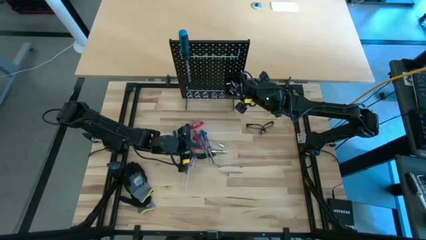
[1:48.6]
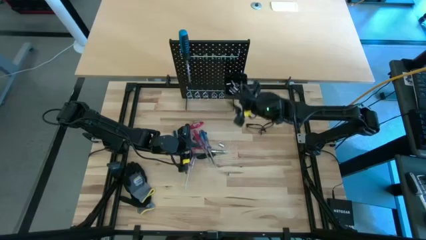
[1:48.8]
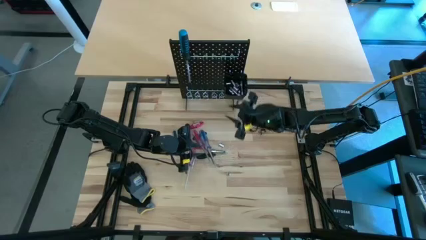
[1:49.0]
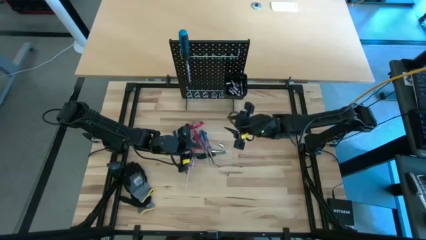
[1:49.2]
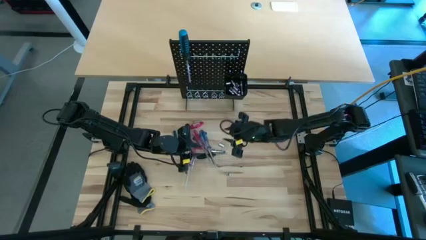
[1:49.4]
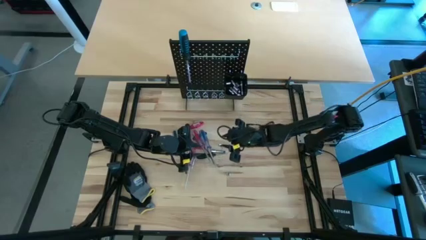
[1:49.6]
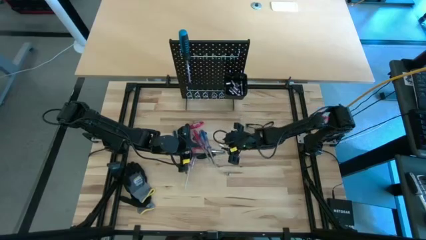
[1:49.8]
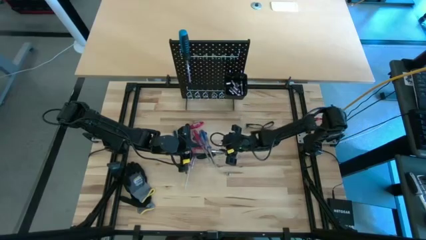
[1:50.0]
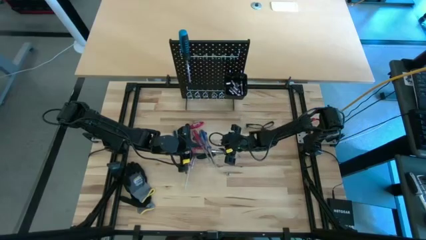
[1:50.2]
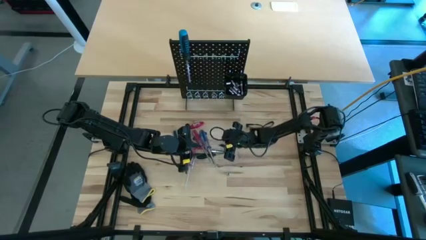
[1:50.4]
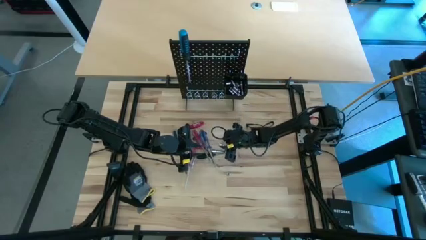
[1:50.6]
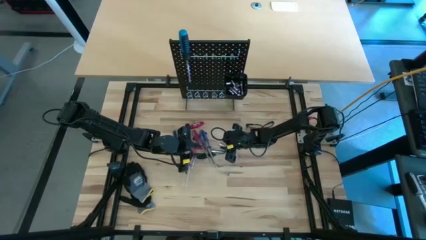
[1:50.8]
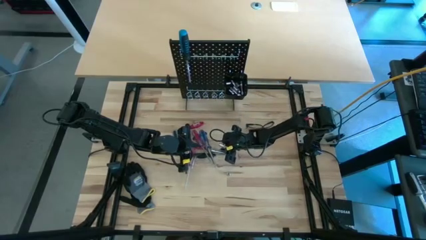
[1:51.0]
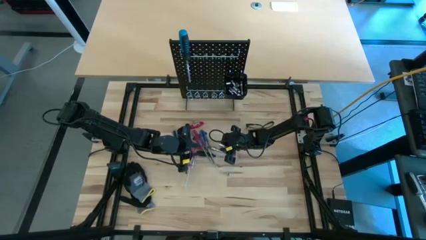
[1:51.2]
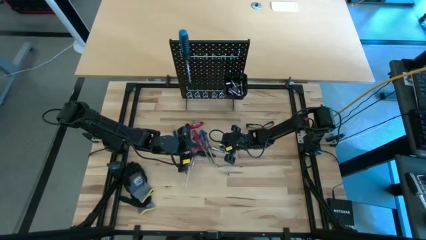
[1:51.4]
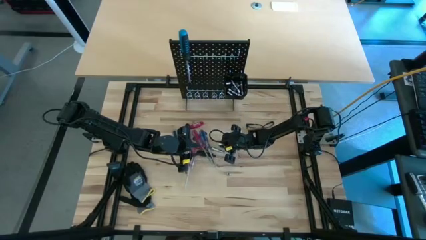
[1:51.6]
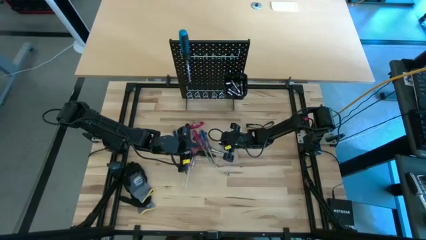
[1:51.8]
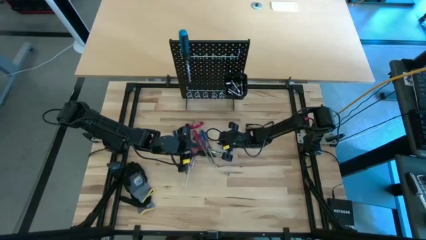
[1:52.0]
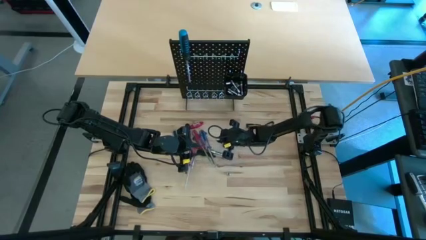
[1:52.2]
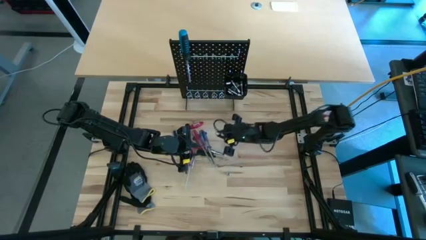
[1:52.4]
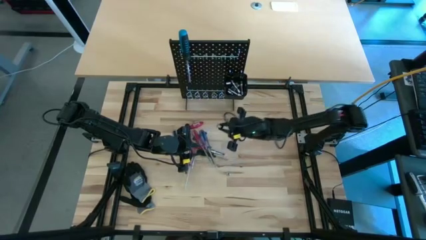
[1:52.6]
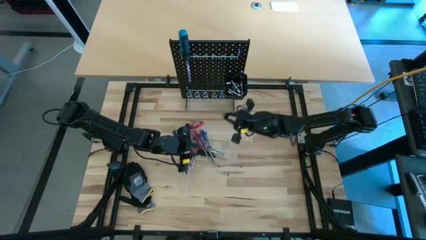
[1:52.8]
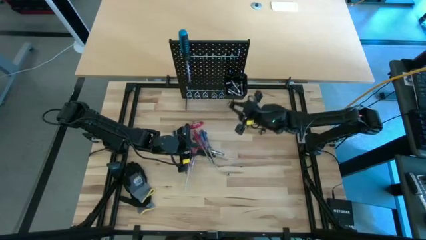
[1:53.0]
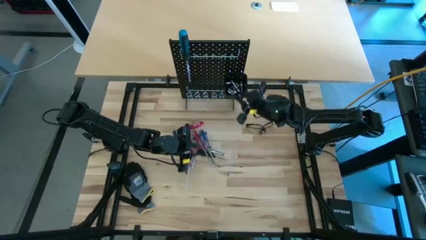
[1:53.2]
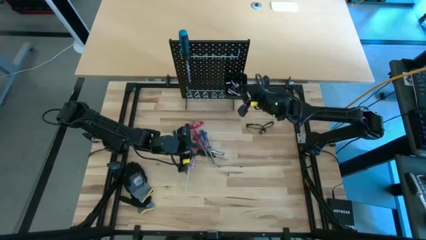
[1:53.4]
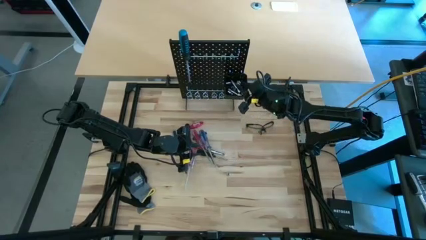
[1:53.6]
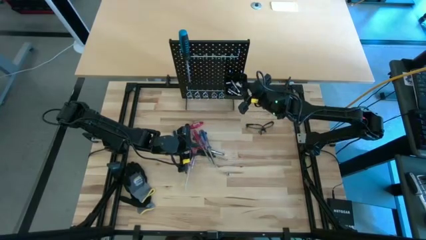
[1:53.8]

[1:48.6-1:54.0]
Task: Hang tools onto peg board
Put the silver socket into the black bin on the peg board

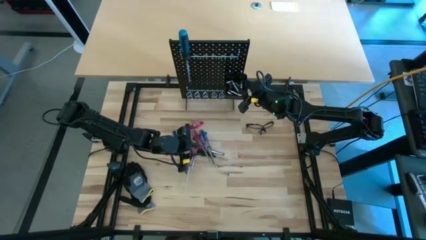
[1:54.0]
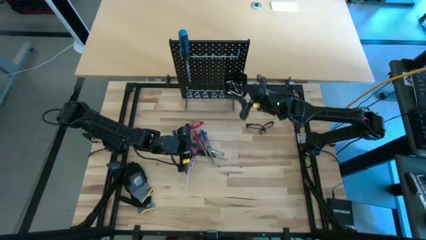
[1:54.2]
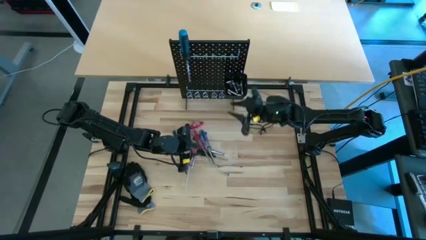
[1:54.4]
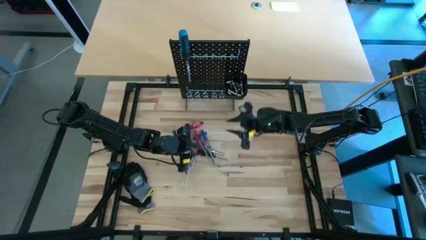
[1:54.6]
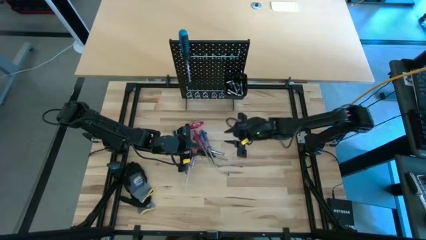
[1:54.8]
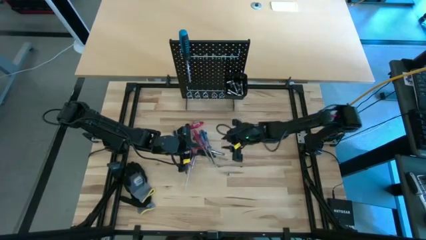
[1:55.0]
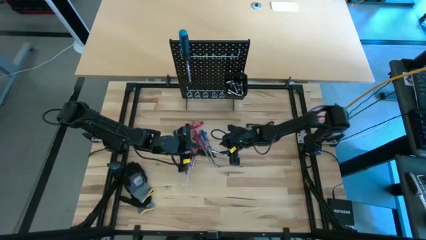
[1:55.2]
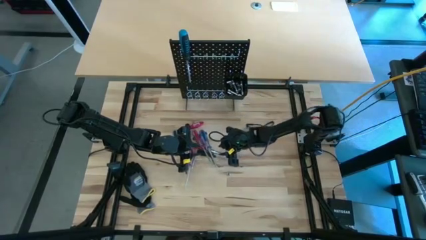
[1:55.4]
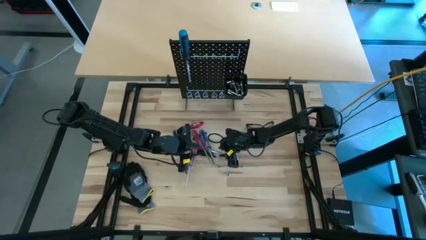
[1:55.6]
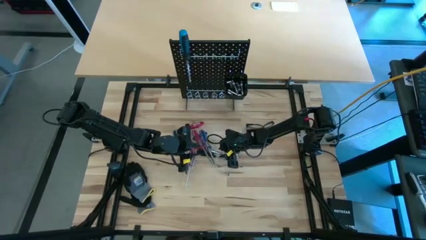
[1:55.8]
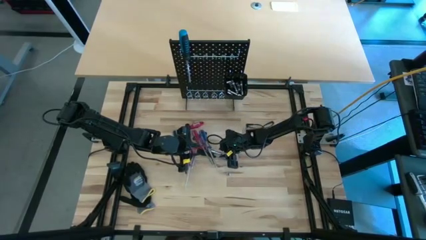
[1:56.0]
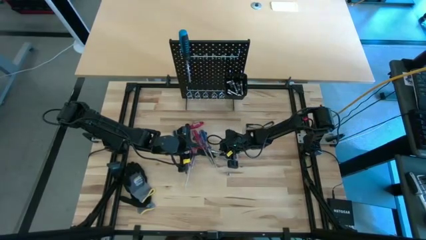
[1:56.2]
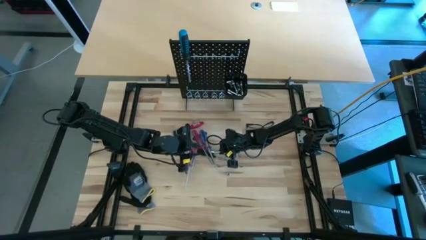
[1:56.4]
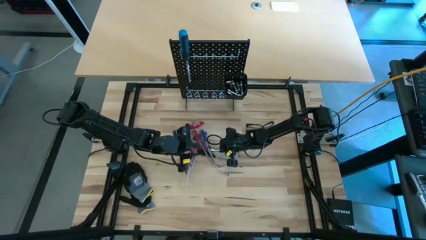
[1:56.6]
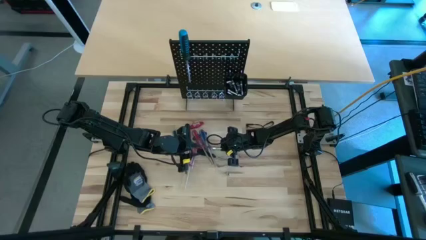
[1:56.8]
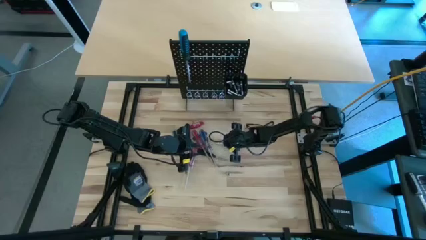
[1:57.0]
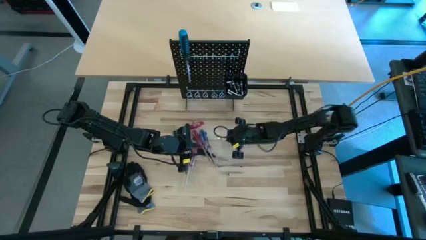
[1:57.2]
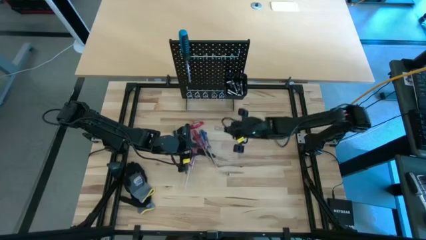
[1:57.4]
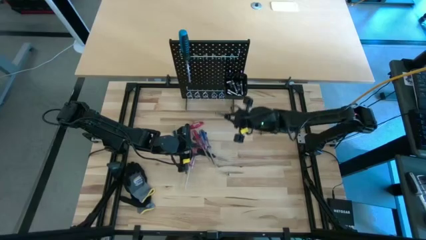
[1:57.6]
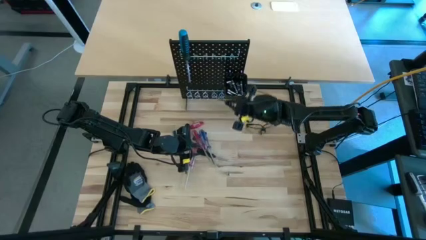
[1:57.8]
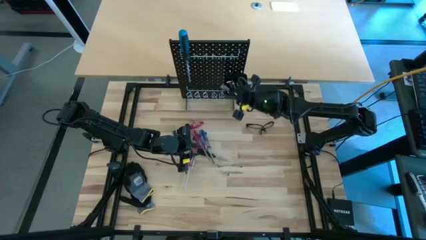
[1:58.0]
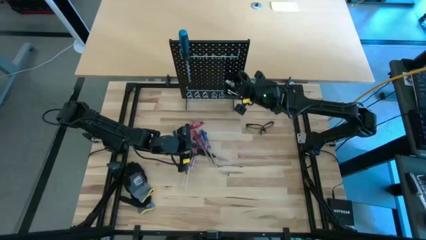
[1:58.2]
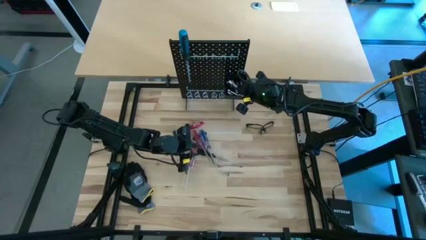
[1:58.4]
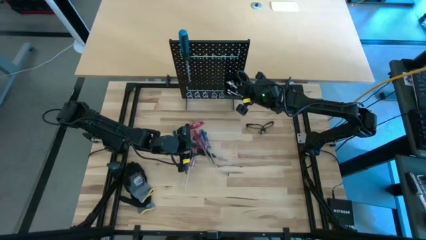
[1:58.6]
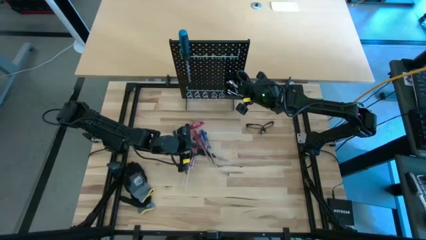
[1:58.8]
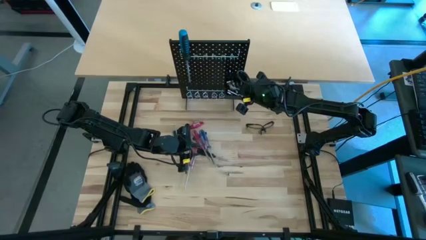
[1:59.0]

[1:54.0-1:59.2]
Put the silver extension bar into the black bin on the peg board

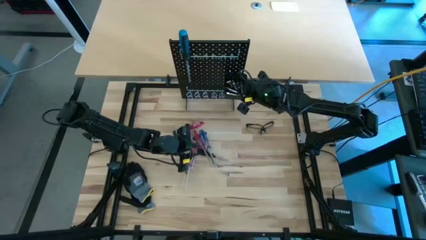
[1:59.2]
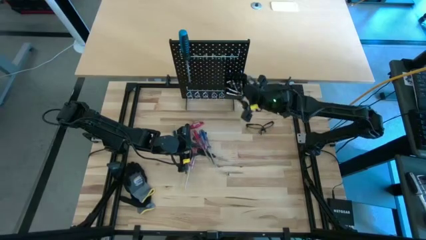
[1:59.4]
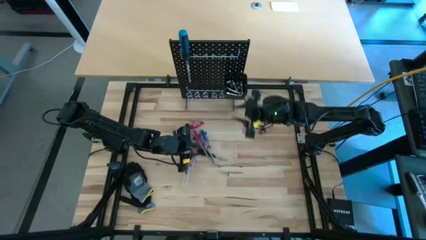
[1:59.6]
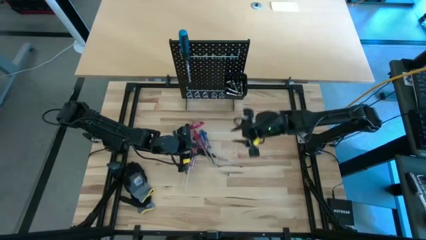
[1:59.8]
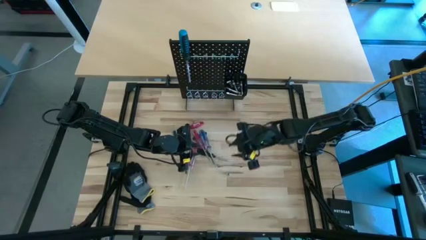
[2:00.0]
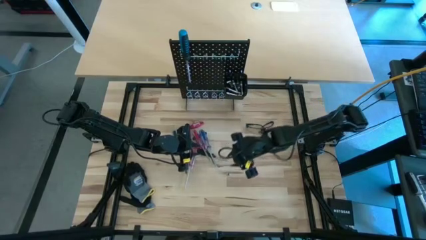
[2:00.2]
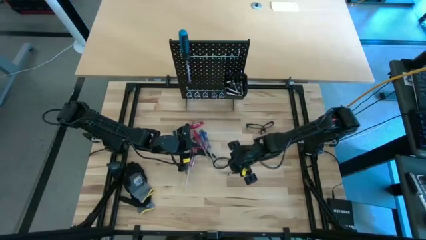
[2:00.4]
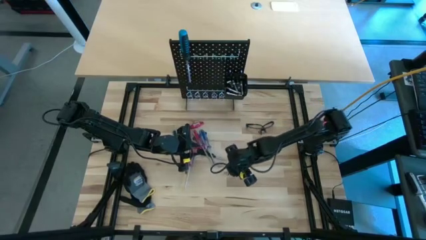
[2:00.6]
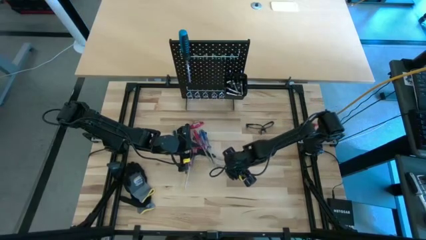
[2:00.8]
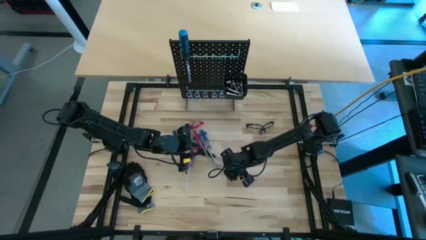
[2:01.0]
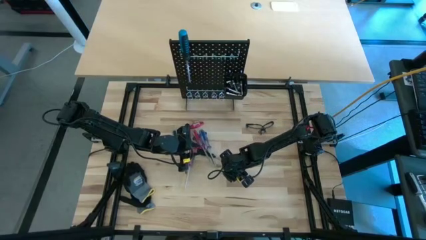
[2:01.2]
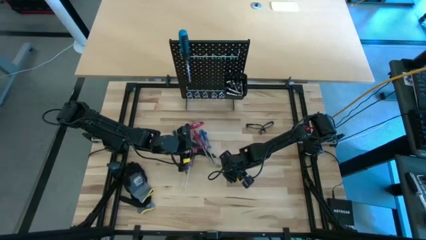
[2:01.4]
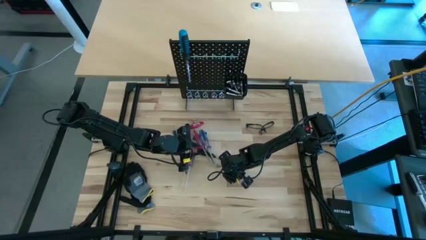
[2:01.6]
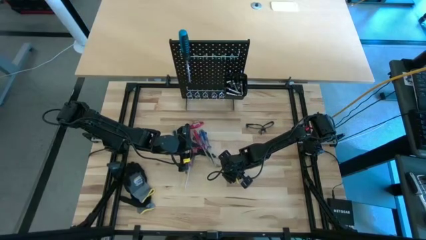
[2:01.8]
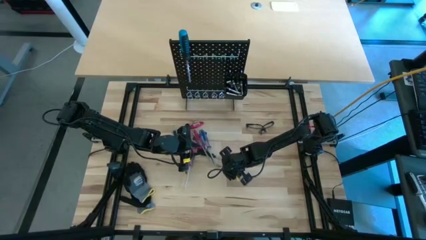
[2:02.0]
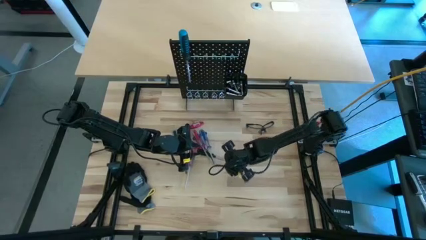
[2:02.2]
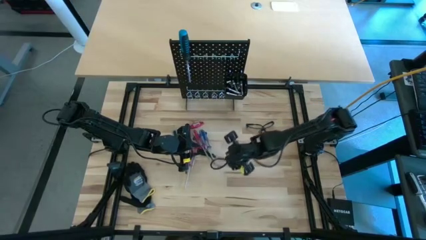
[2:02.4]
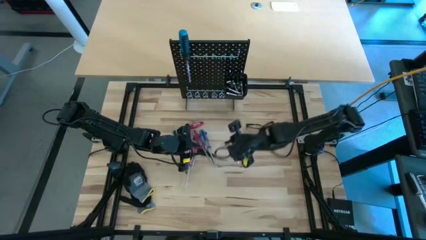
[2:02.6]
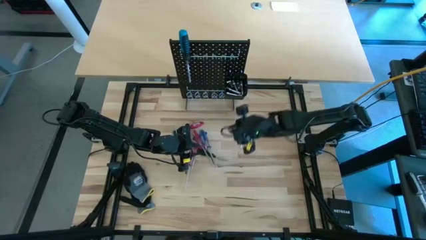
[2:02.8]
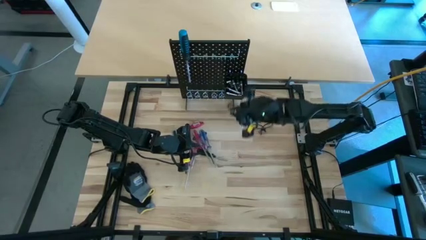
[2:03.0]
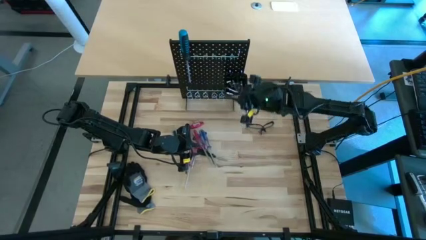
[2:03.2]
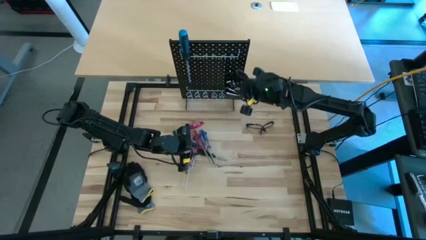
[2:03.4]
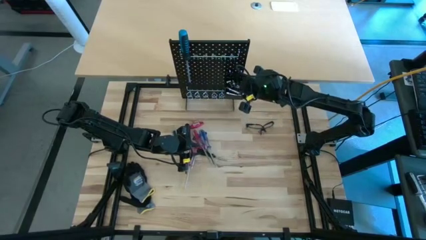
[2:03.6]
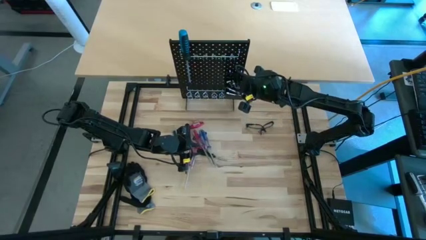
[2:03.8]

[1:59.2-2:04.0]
Put the silver socket into the black bin on the peg board
